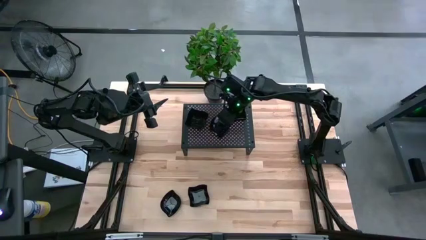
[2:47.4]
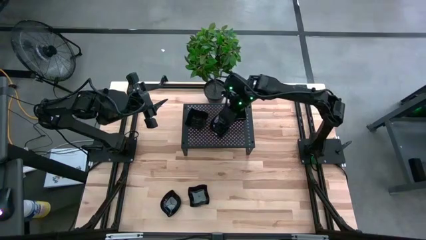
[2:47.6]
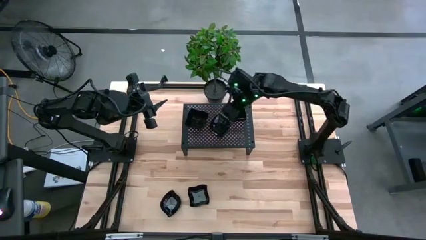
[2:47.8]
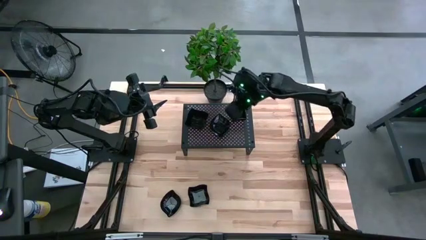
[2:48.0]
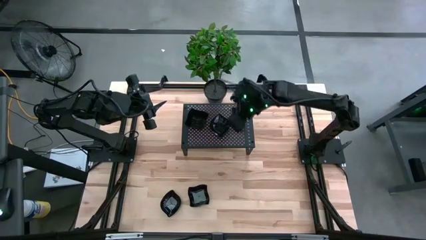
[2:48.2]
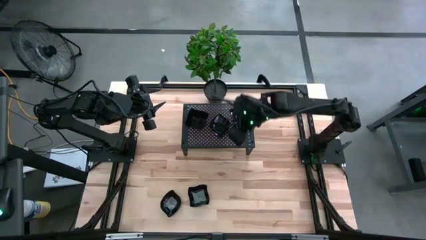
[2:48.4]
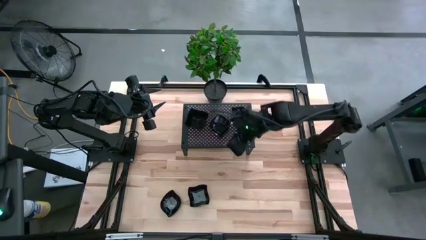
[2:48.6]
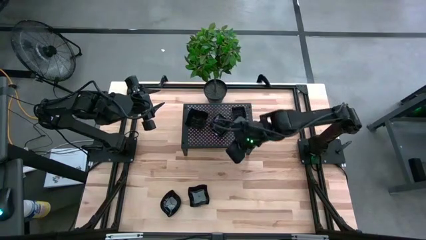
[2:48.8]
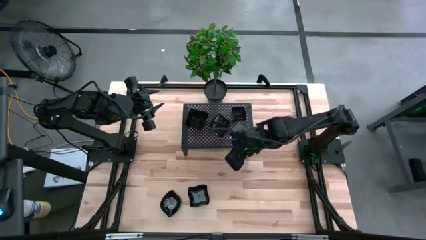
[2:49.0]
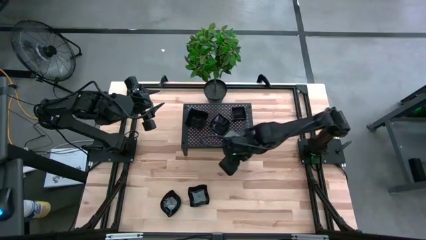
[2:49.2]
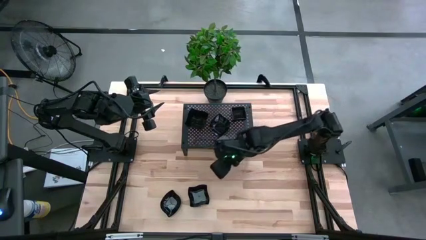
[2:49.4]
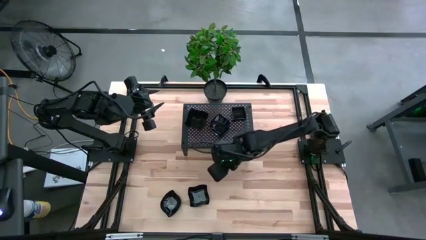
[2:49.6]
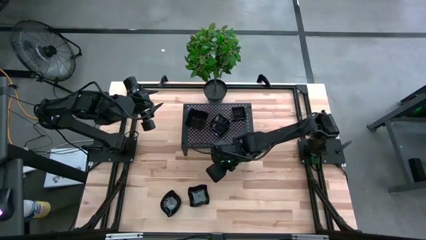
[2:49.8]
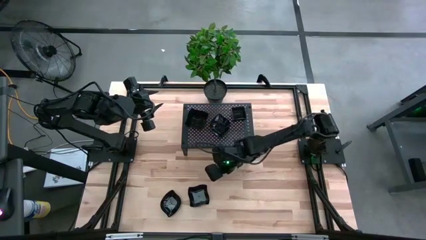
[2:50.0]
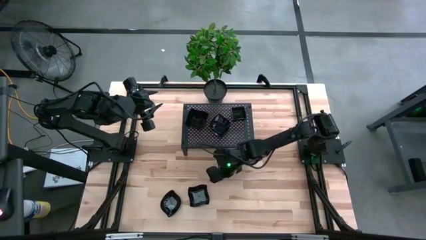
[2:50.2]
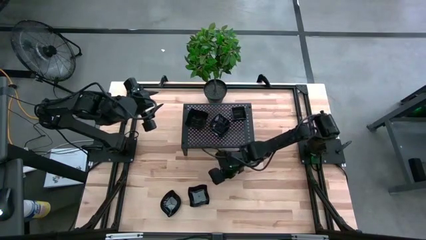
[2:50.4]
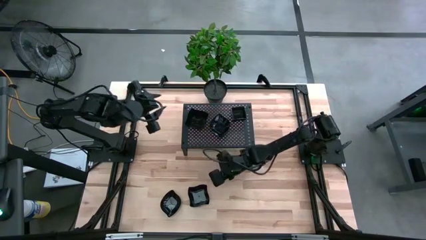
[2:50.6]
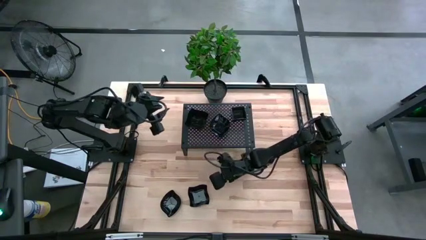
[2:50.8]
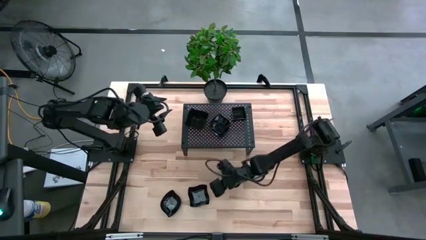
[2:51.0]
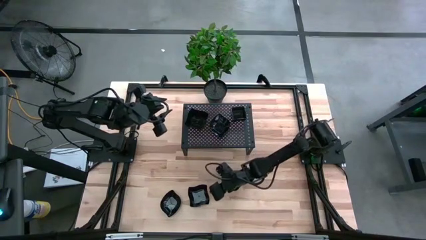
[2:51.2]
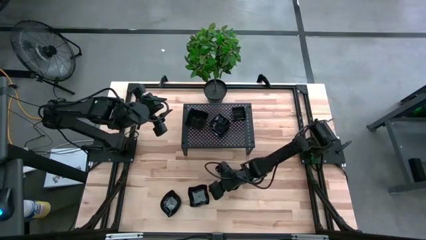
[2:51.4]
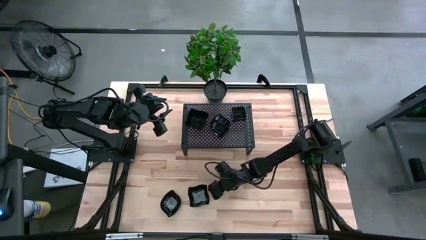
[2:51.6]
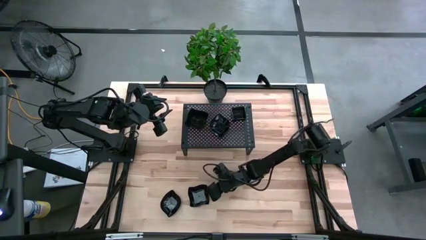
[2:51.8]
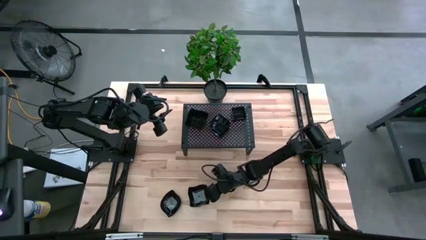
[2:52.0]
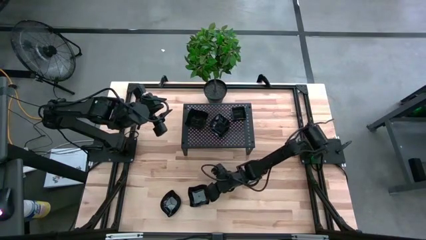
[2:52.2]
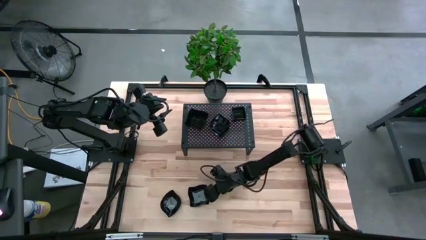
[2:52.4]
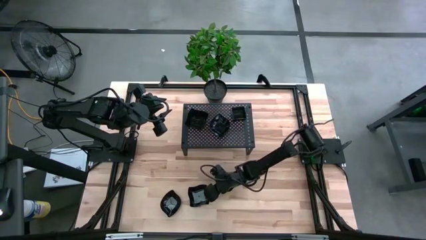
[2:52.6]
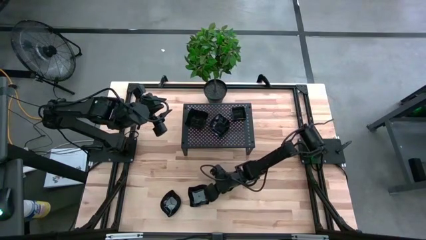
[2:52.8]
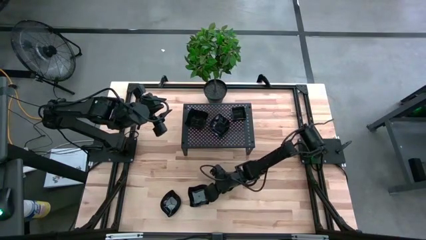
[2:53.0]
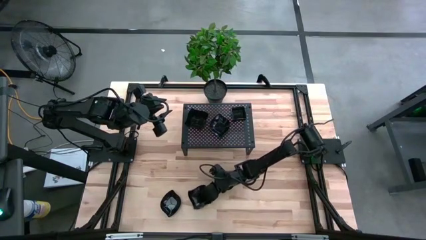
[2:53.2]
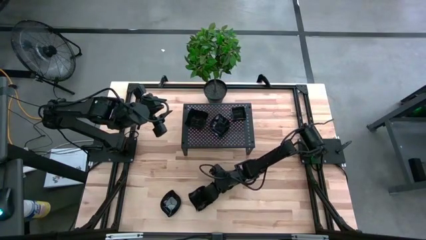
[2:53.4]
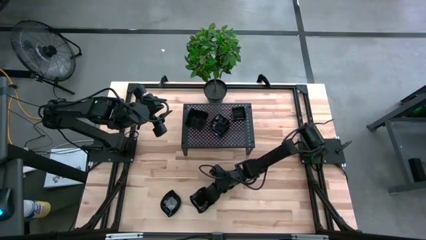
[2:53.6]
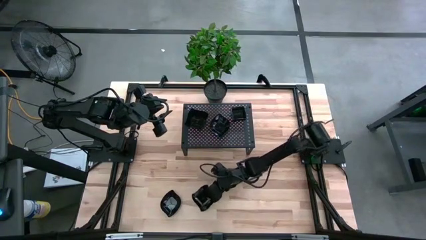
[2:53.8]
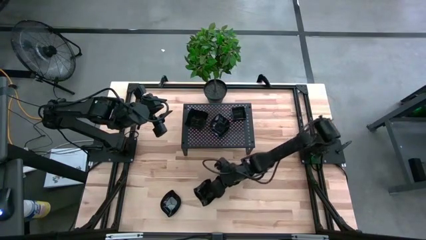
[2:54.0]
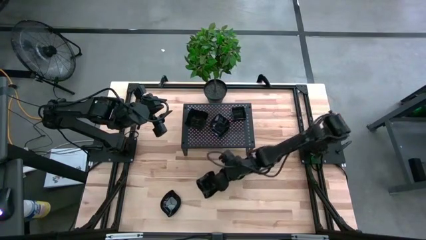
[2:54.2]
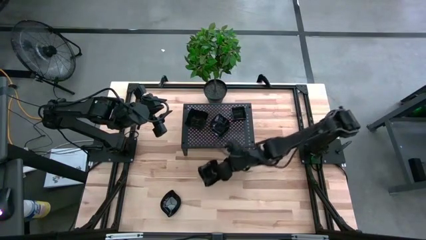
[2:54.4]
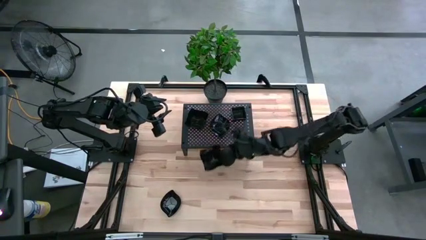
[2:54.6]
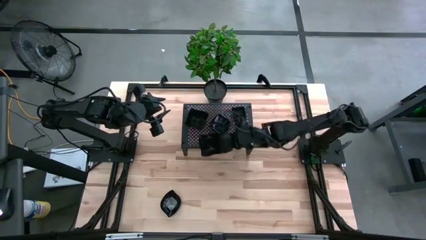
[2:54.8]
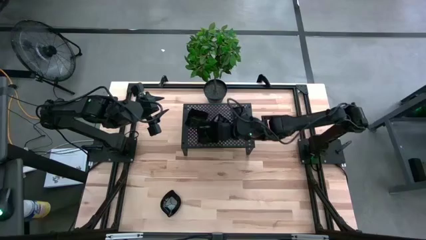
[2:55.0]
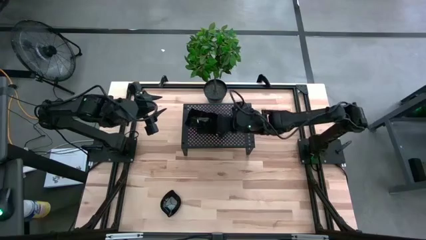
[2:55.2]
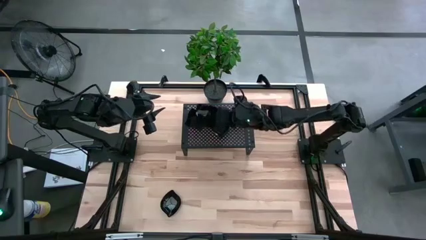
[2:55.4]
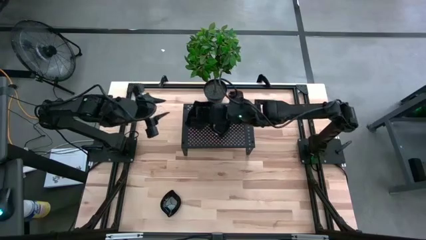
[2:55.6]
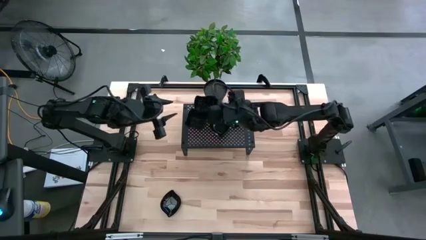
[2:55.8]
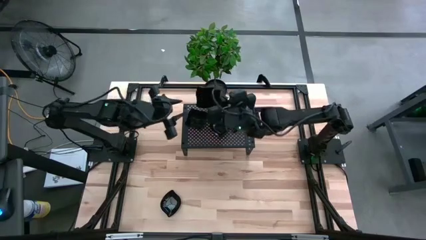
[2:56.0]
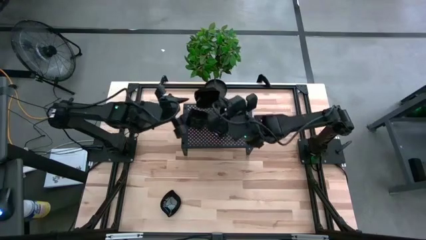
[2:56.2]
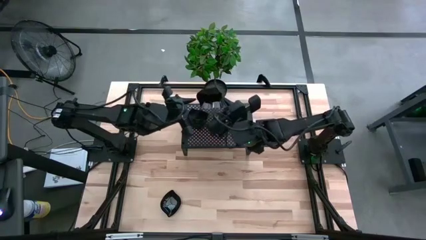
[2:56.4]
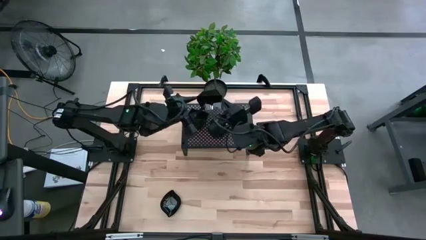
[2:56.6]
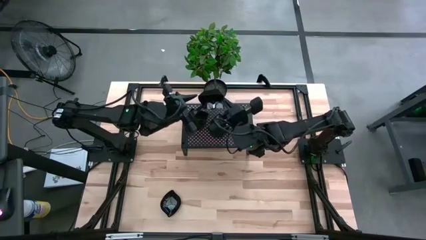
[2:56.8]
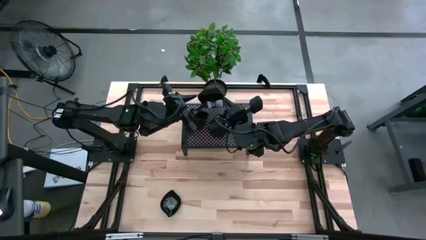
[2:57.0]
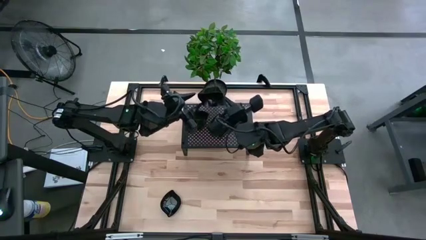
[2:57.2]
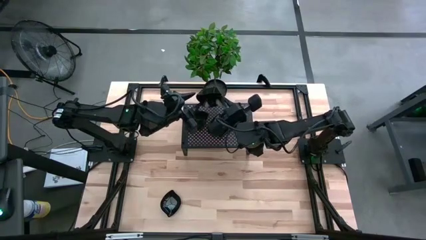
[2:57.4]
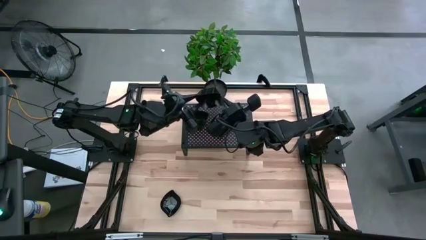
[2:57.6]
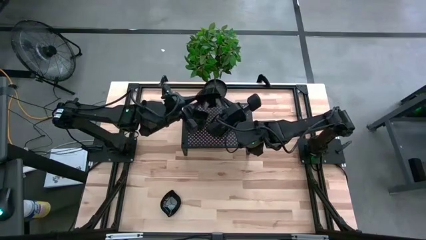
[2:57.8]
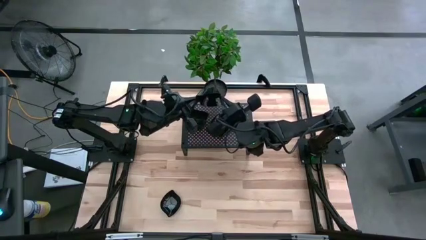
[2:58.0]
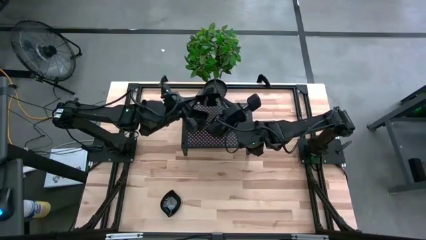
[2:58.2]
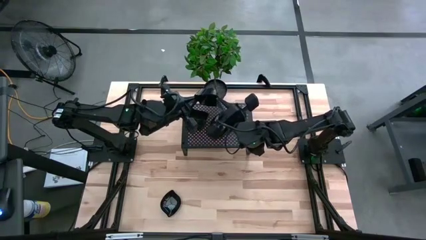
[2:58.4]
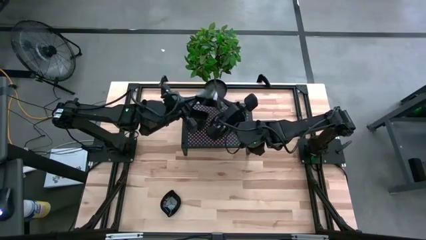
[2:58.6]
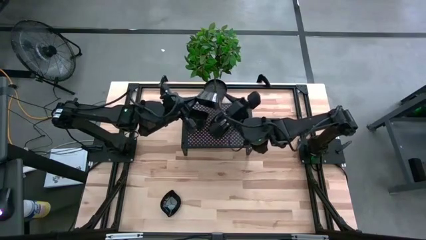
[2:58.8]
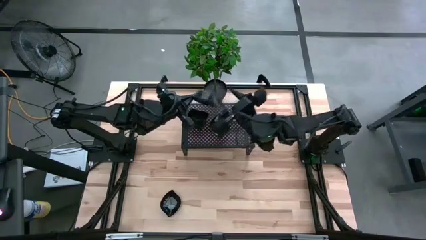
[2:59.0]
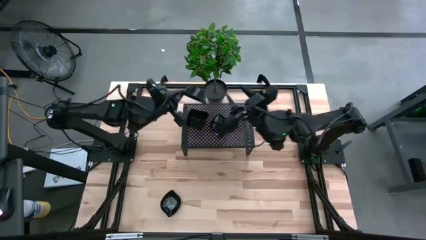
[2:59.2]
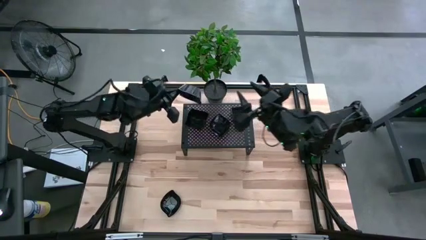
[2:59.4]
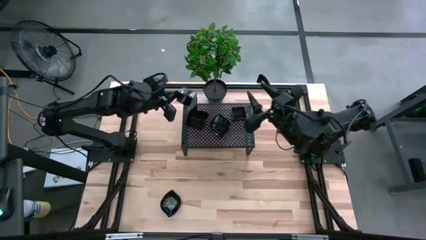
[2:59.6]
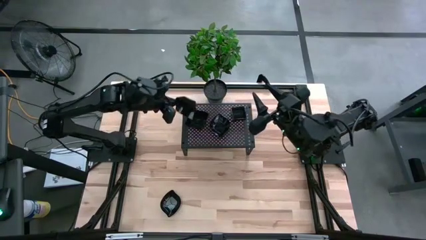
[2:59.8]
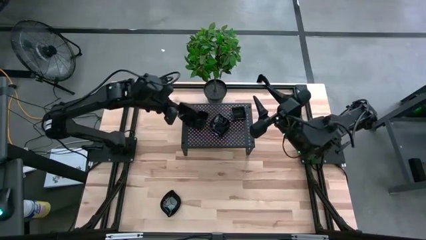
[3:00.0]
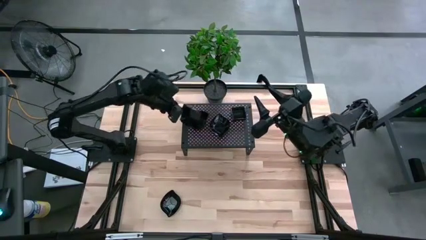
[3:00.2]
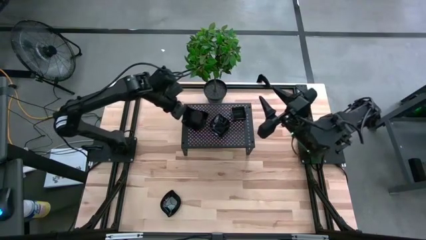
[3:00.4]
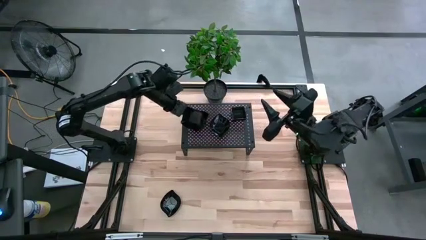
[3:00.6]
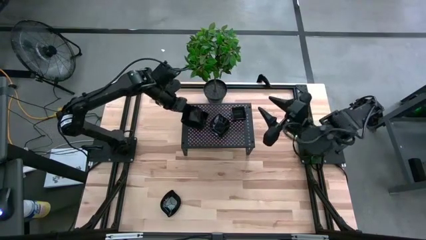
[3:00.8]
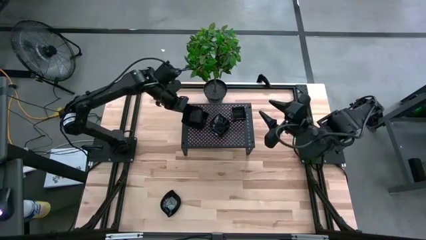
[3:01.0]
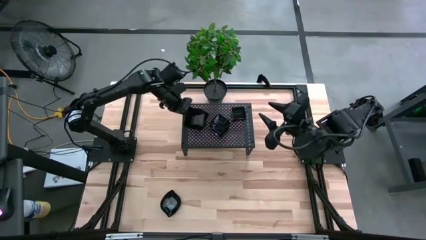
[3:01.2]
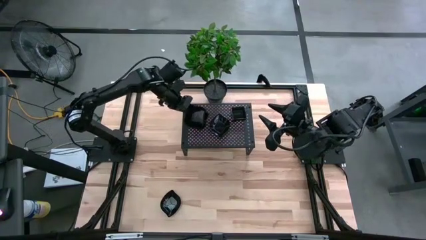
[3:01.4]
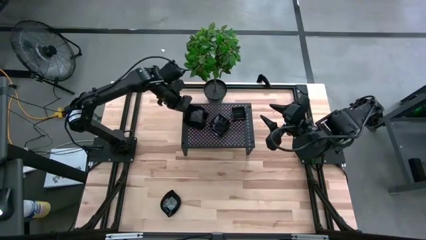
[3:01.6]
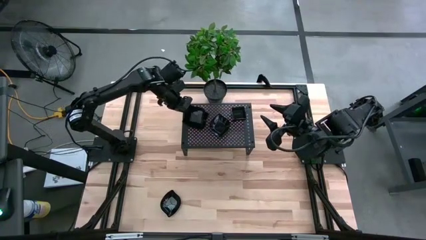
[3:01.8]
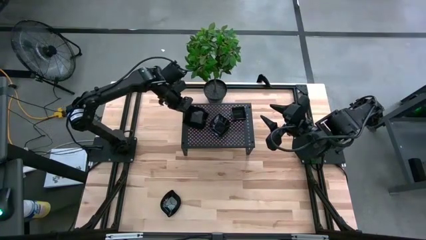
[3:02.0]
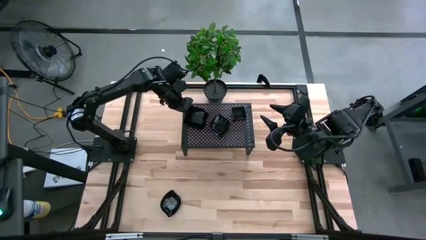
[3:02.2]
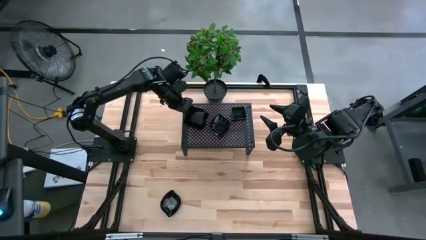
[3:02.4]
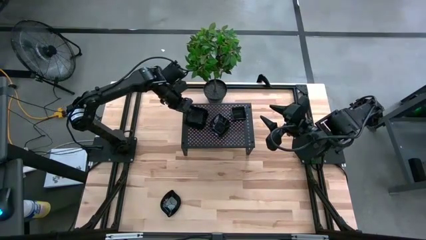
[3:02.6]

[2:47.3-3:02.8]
Task: Pick & Place Mini shaped plates
Stack the black distorted square plate on top of the other black distorted square plates on the shelf
